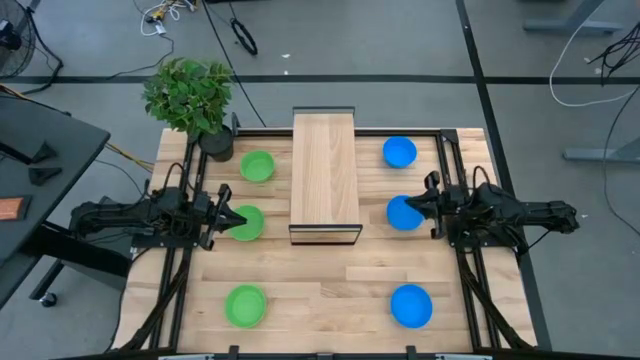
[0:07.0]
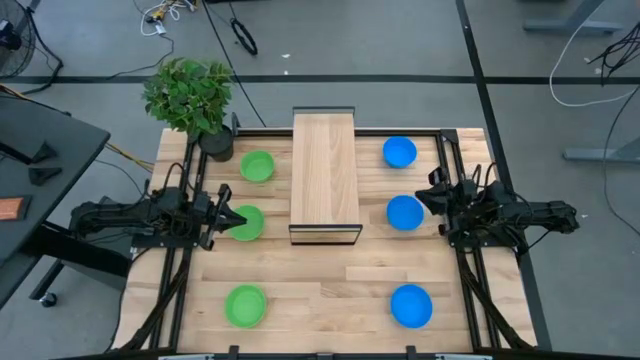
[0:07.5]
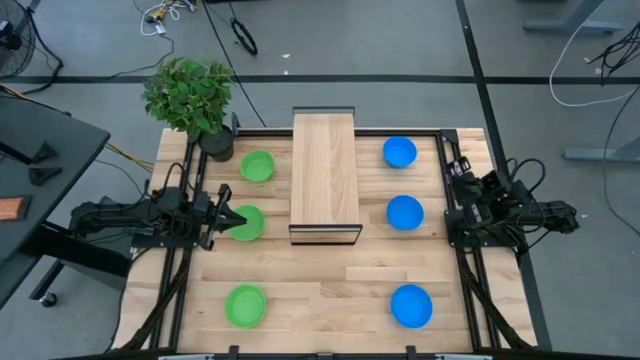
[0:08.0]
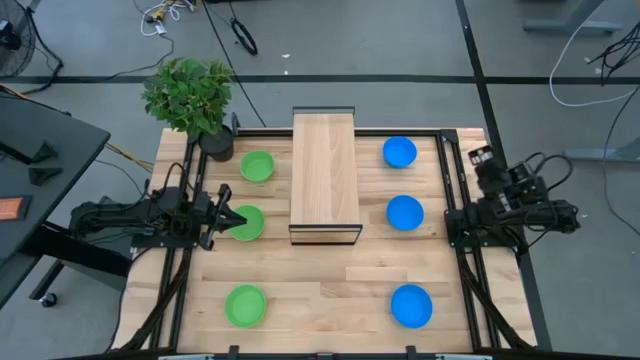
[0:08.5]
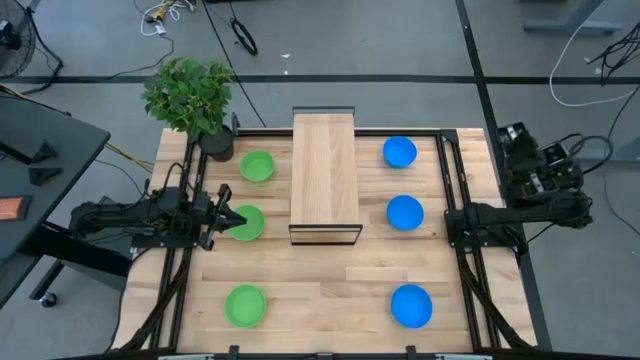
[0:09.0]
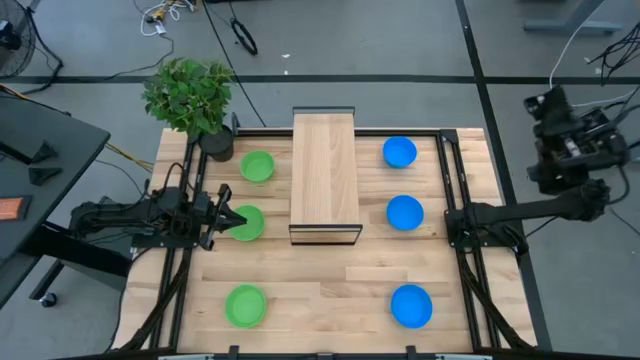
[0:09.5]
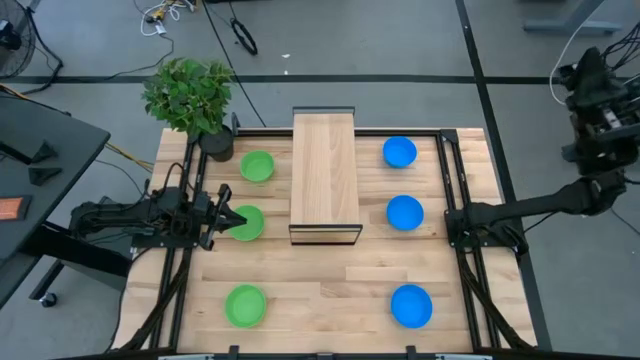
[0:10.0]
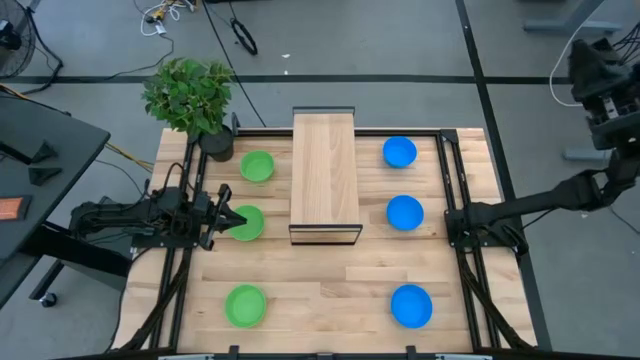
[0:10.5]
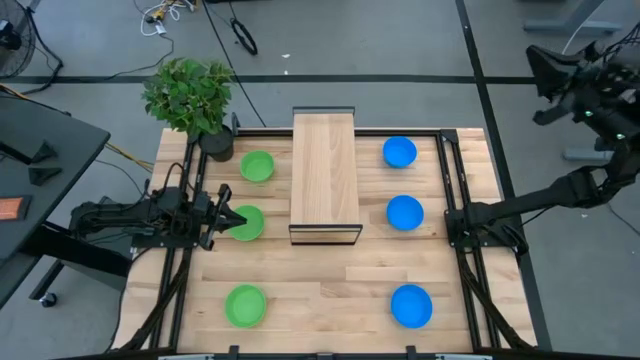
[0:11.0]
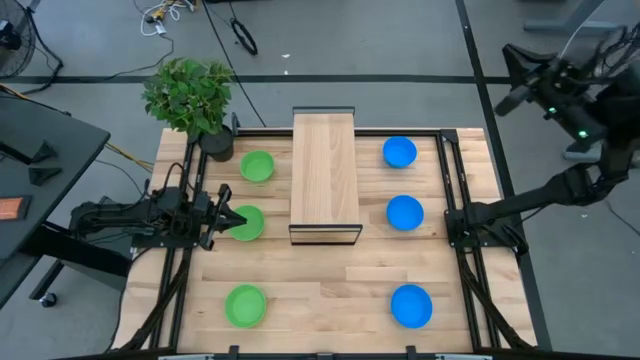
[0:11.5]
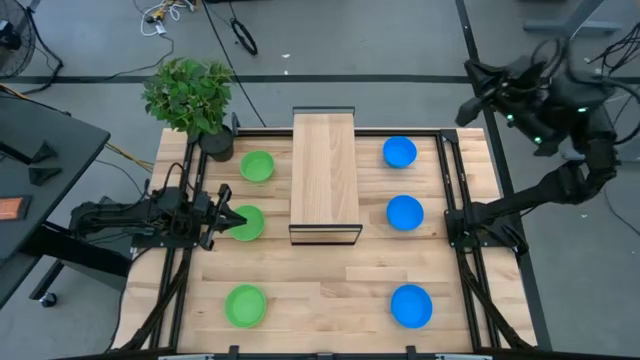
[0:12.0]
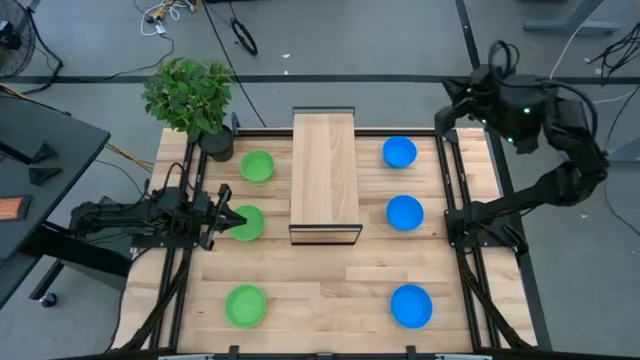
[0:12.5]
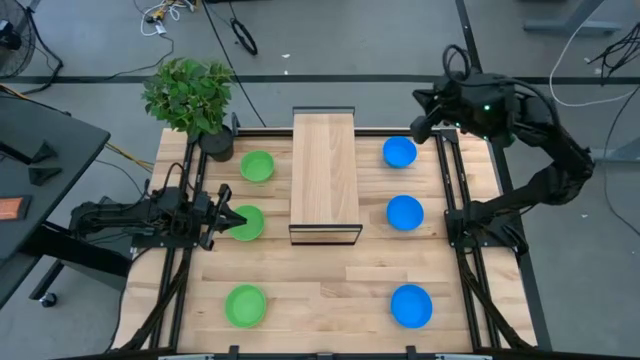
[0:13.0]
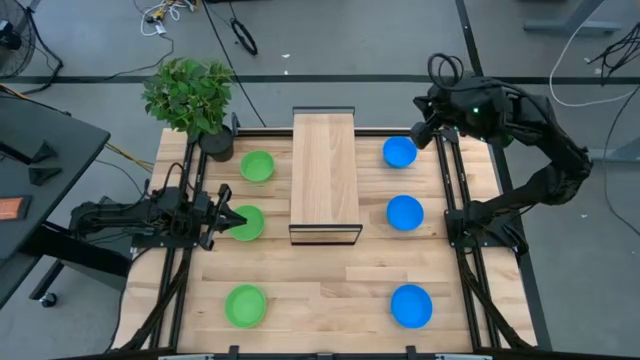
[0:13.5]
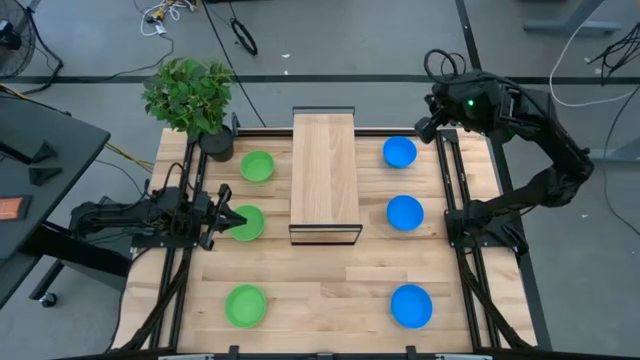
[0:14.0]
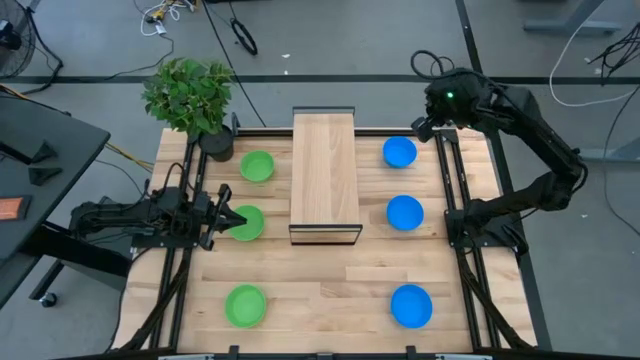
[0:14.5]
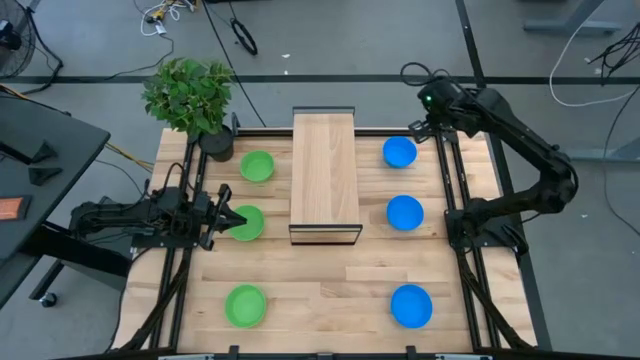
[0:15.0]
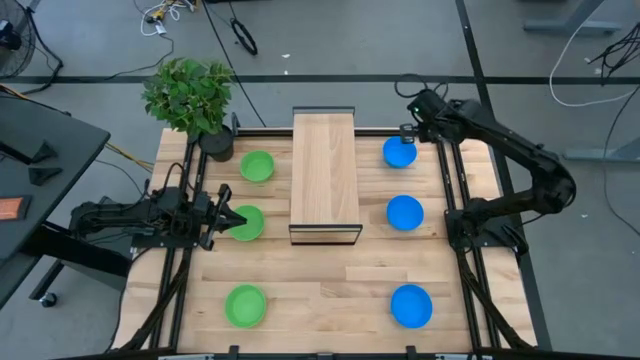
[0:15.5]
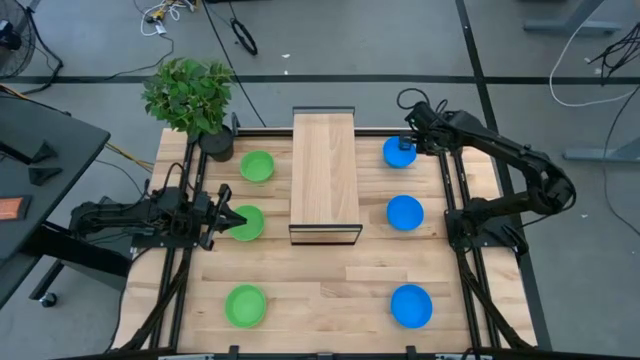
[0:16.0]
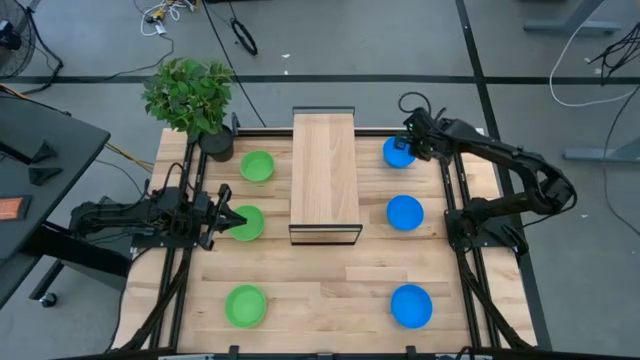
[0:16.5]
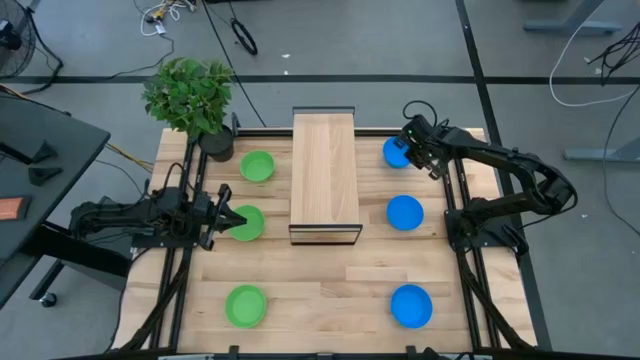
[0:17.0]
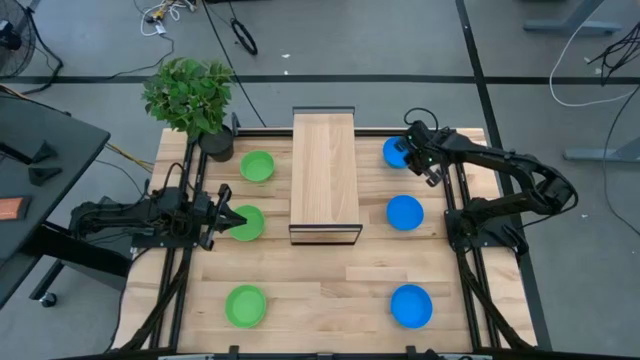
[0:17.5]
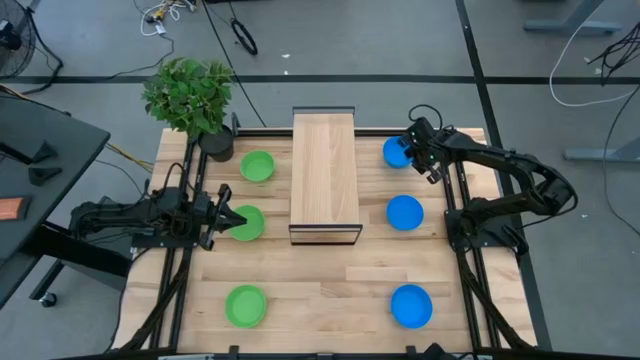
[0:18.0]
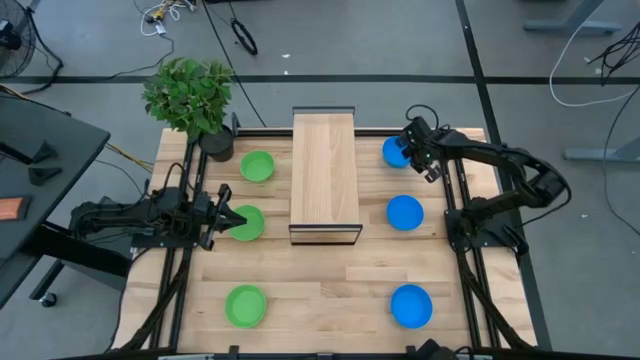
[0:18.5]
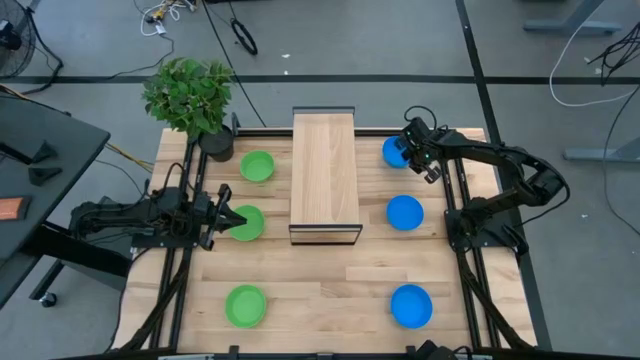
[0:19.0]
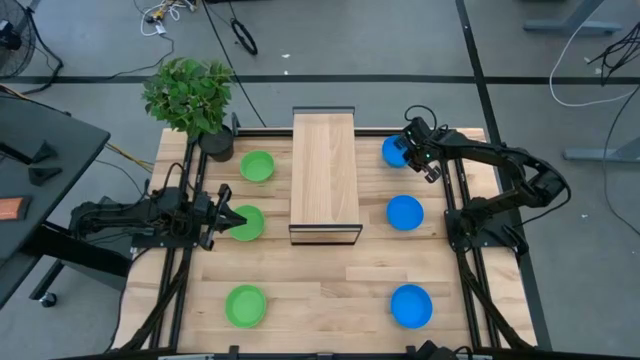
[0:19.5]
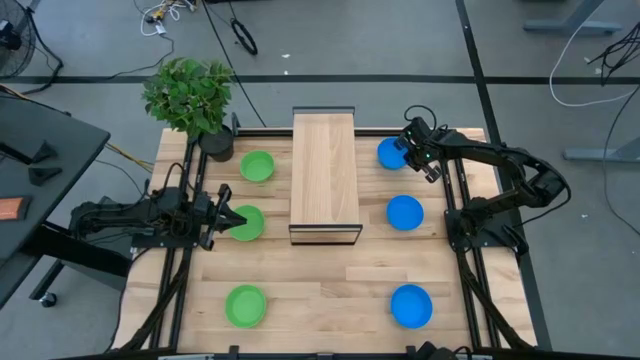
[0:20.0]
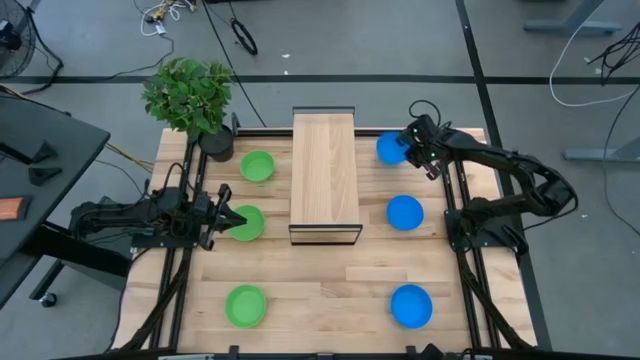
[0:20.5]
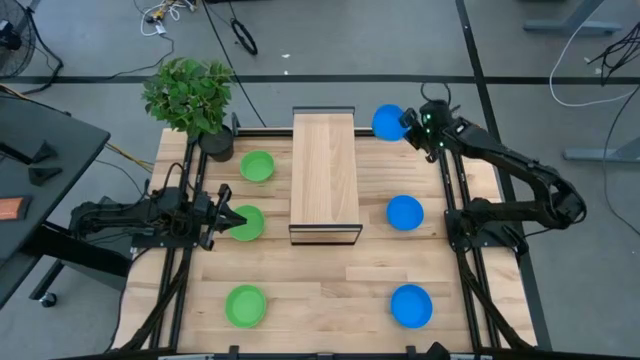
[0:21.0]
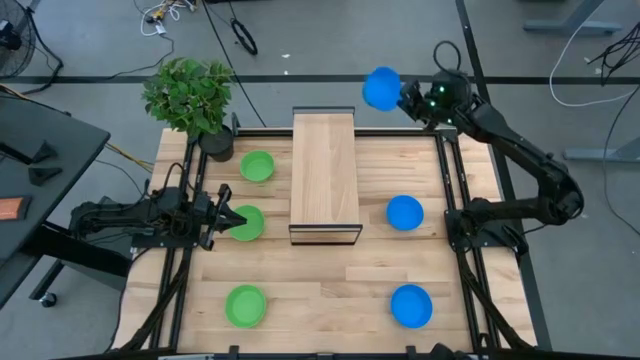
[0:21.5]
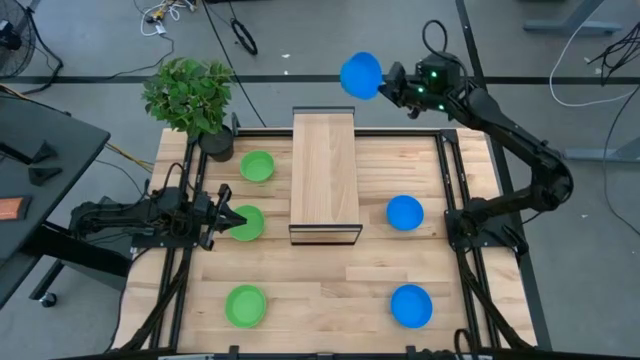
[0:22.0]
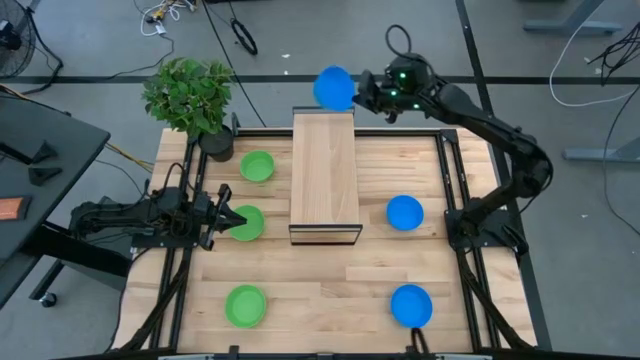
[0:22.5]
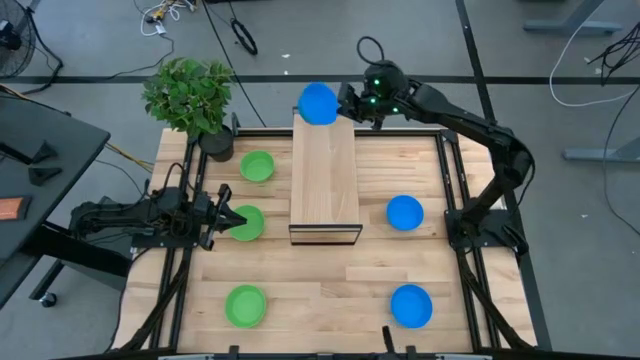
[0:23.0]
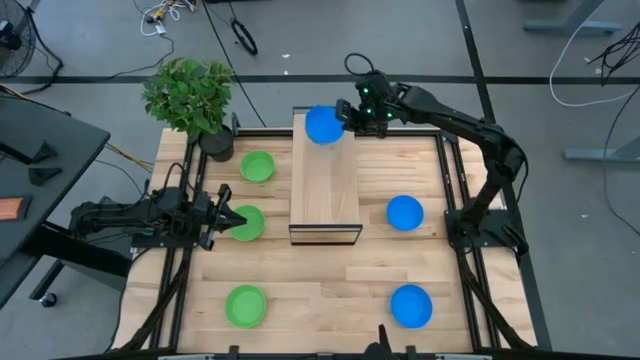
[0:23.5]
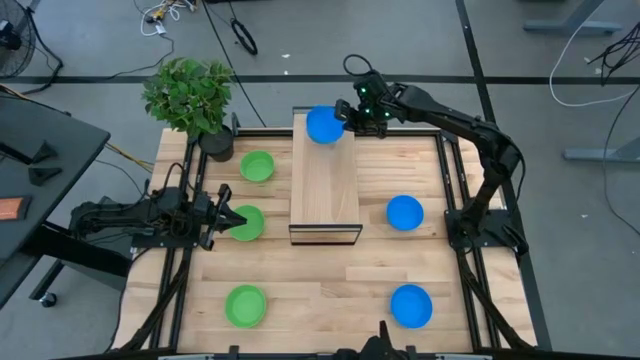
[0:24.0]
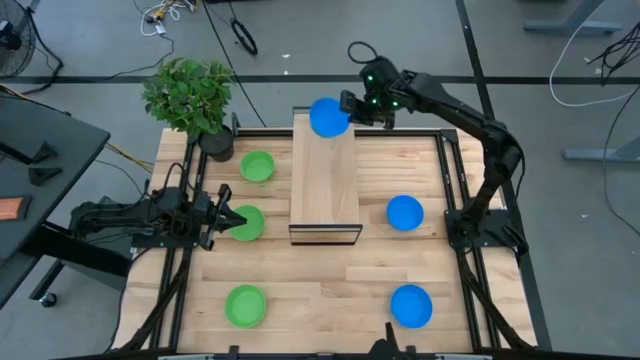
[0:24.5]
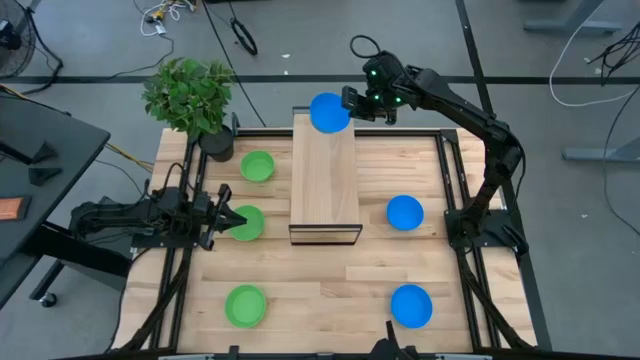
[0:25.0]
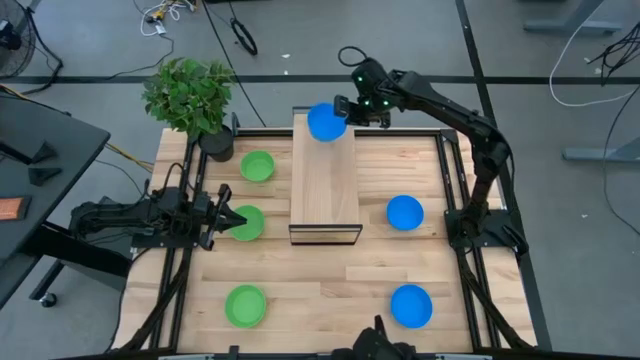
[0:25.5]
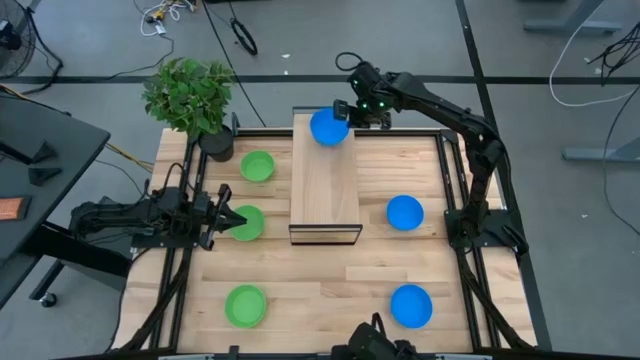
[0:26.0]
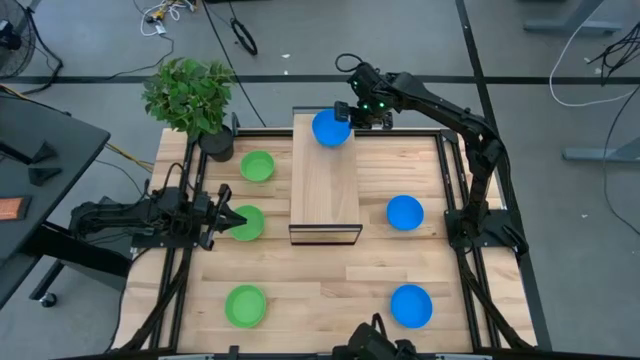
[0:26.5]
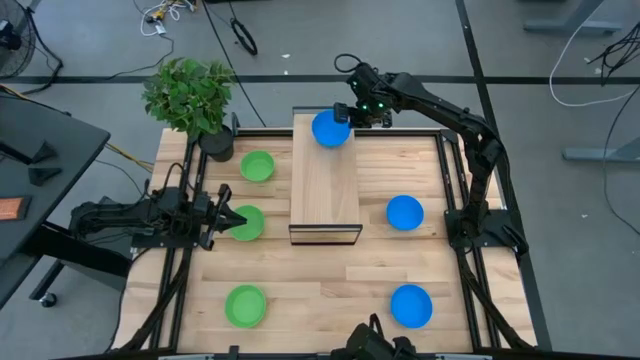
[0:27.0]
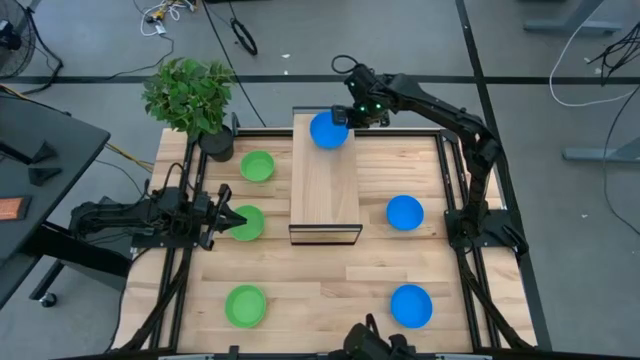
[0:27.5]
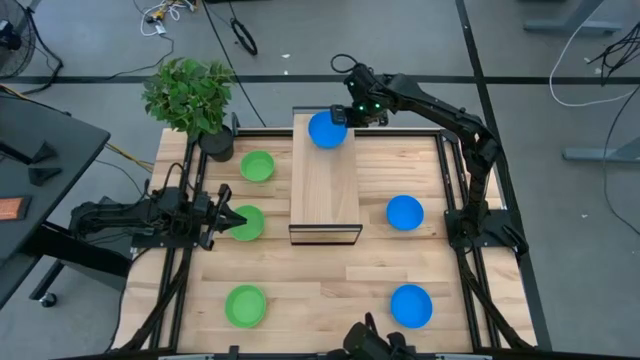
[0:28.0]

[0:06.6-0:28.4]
Task: Pick & Place Mini bowls
Put the top blue bowl on the shelf
